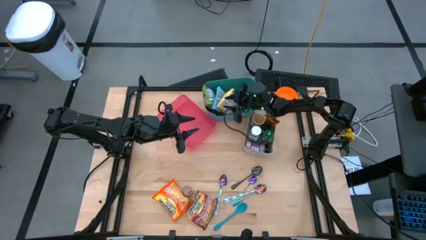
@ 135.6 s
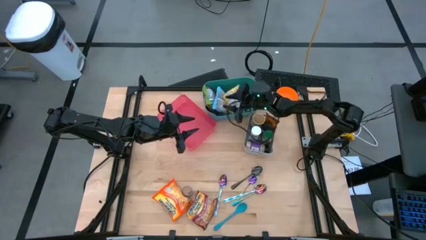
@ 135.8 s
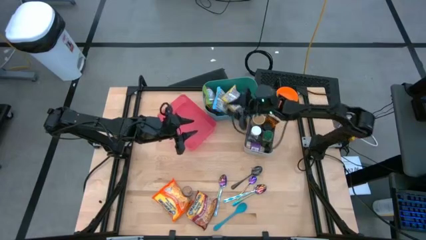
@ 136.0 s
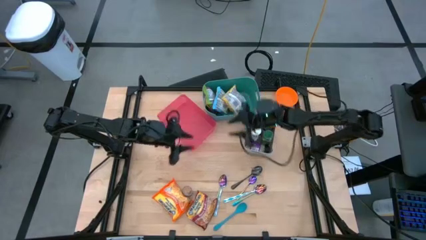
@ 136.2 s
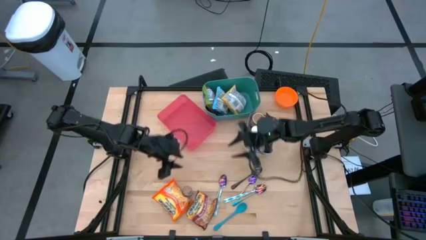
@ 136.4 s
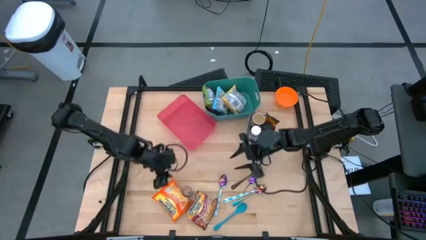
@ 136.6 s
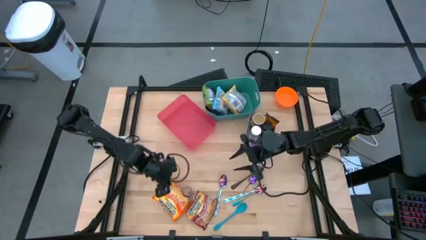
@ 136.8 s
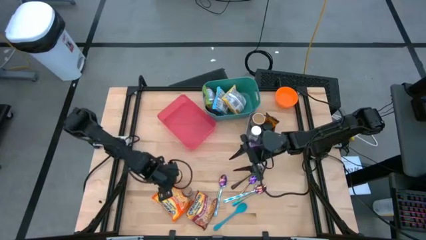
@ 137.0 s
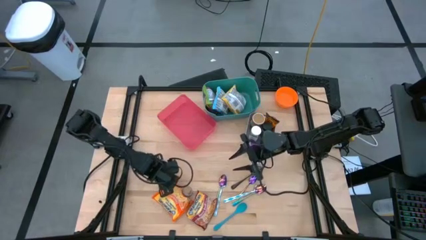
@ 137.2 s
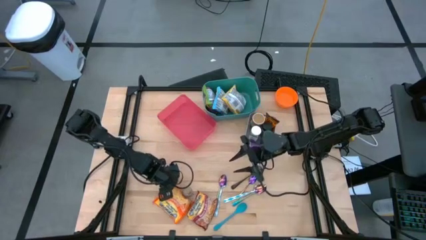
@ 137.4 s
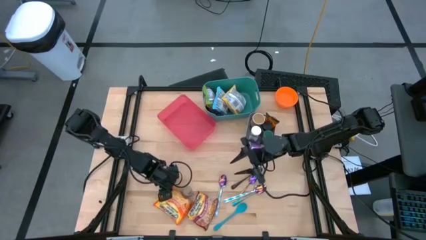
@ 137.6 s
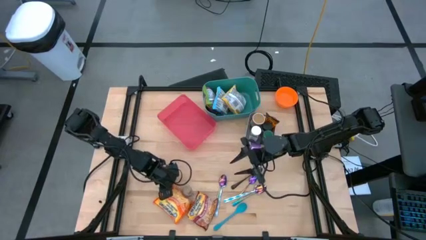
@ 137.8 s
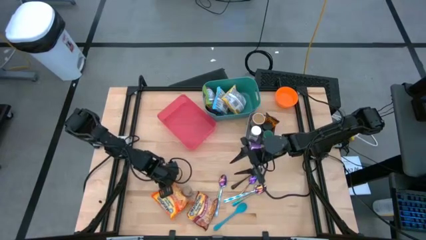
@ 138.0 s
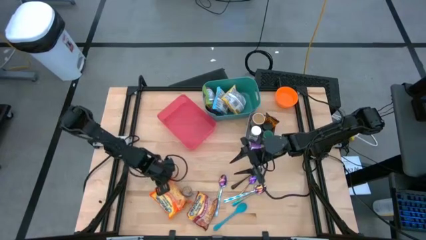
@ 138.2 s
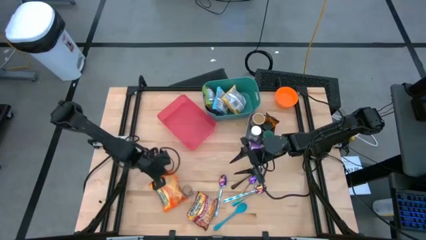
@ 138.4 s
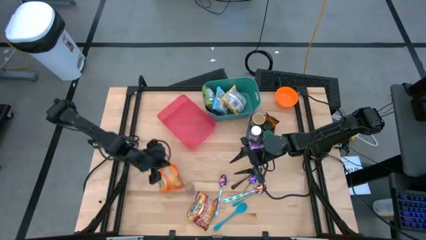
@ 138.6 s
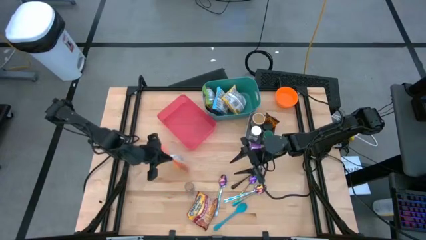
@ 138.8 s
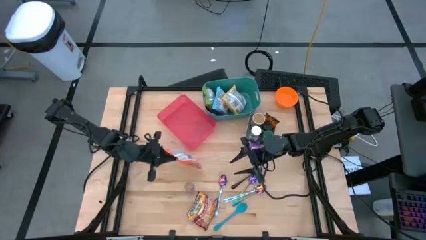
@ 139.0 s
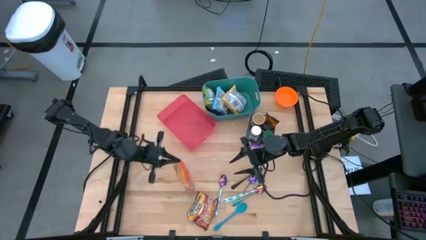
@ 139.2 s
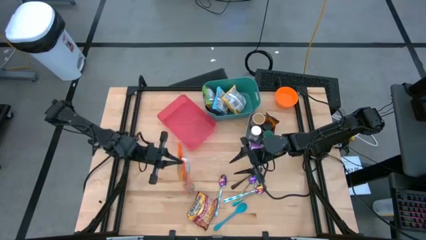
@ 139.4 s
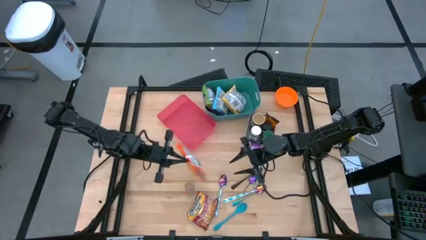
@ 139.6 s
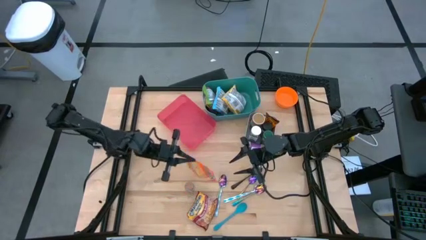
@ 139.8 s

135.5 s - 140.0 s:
Task: Pick & Place Food Item
Put the orange noodle pack into the green bin

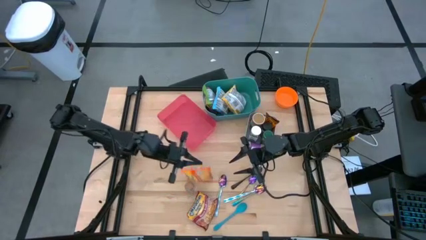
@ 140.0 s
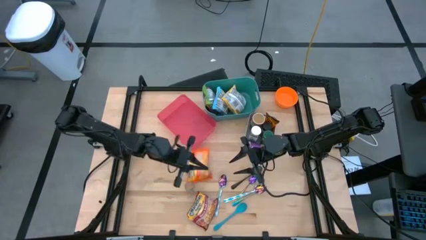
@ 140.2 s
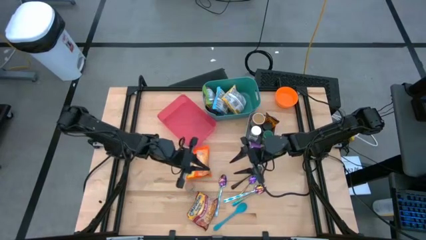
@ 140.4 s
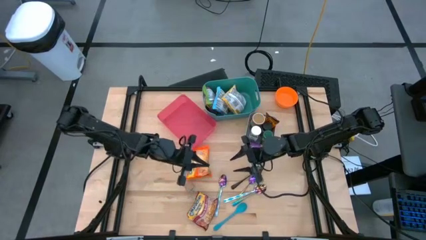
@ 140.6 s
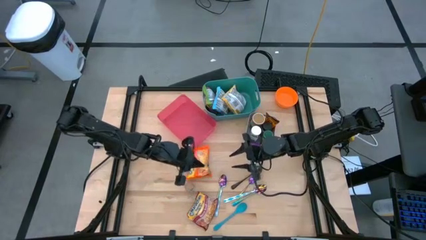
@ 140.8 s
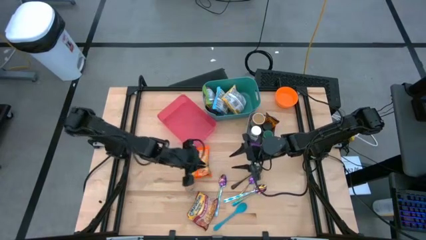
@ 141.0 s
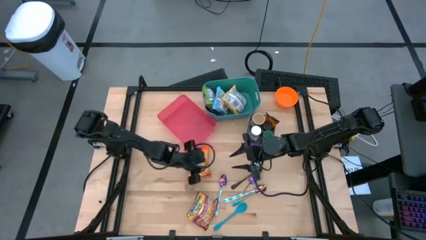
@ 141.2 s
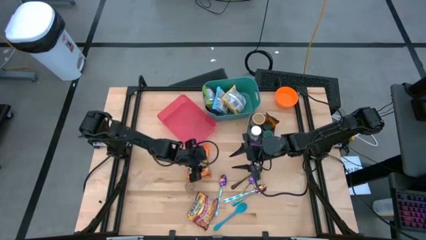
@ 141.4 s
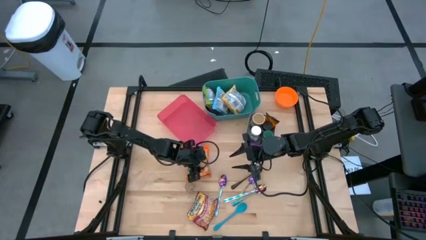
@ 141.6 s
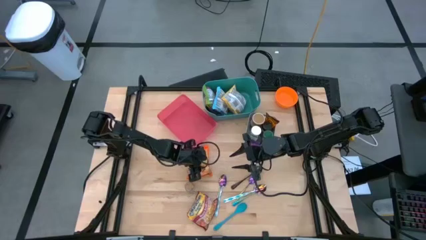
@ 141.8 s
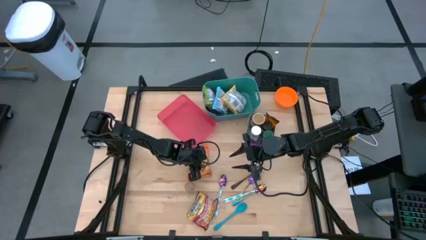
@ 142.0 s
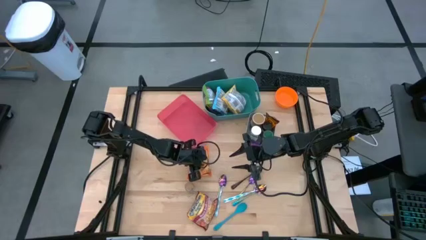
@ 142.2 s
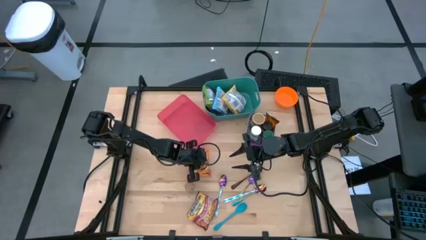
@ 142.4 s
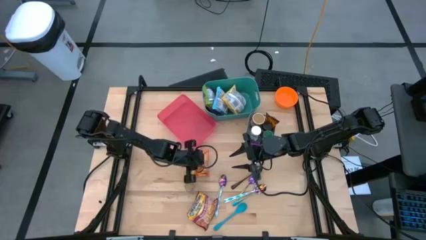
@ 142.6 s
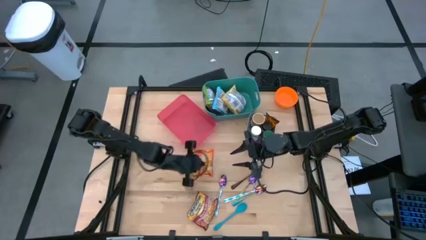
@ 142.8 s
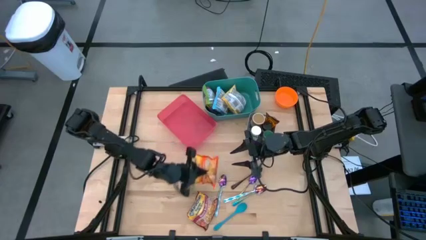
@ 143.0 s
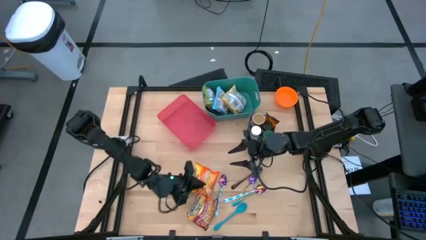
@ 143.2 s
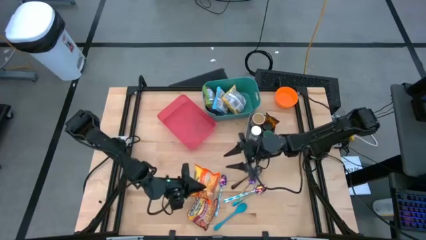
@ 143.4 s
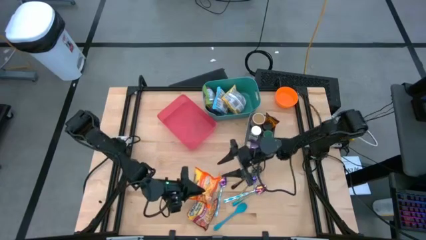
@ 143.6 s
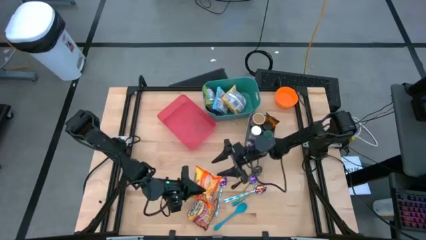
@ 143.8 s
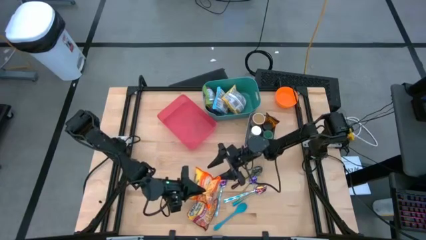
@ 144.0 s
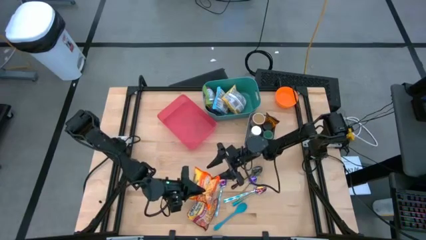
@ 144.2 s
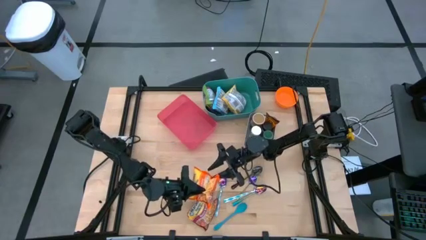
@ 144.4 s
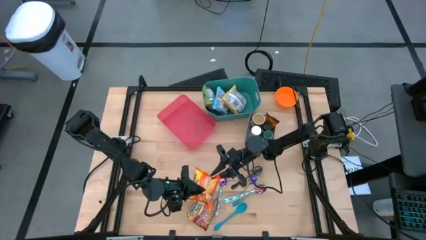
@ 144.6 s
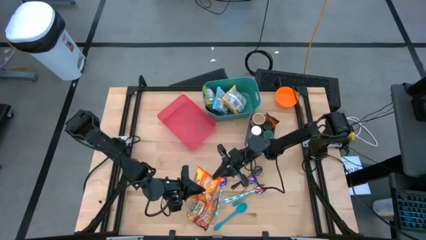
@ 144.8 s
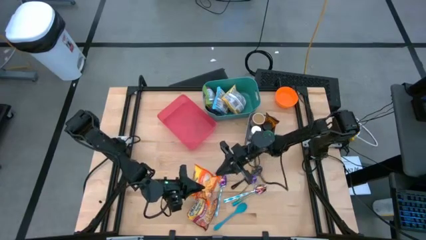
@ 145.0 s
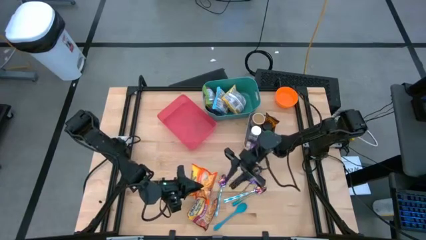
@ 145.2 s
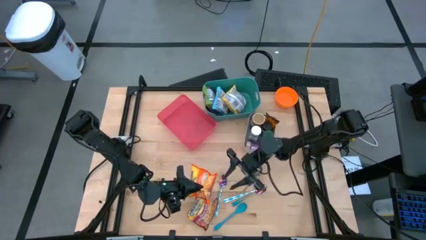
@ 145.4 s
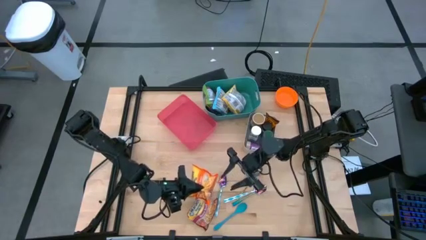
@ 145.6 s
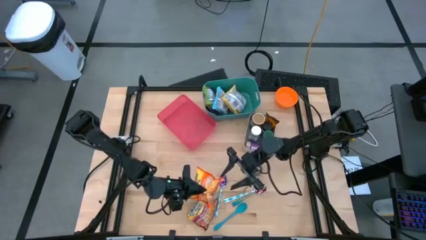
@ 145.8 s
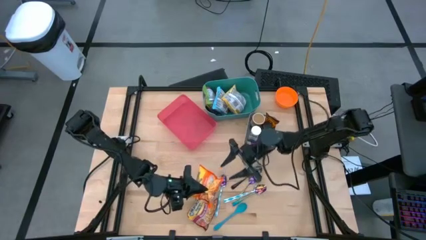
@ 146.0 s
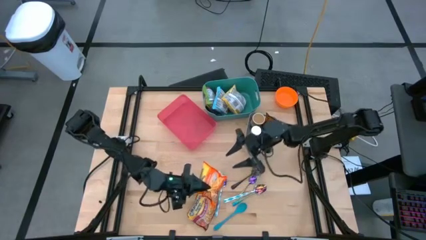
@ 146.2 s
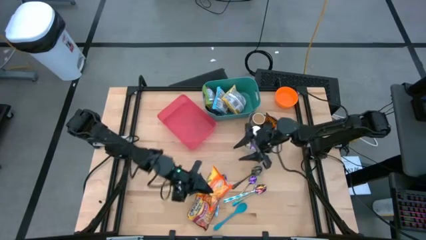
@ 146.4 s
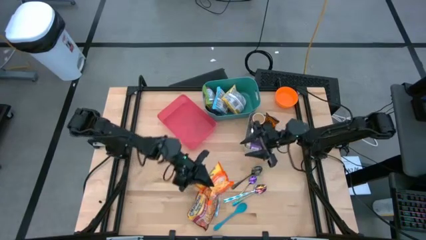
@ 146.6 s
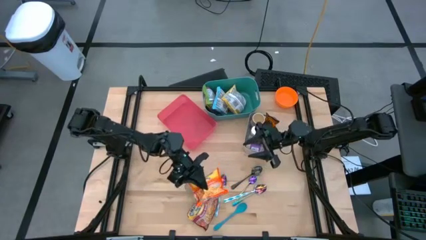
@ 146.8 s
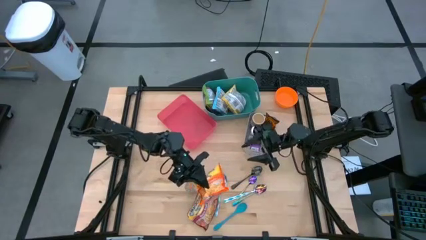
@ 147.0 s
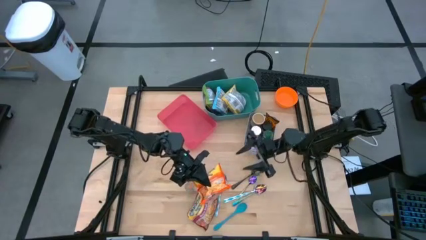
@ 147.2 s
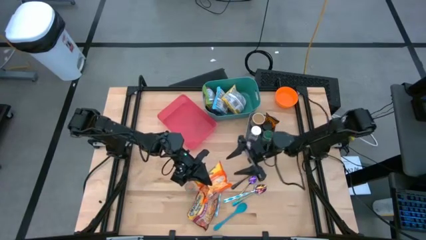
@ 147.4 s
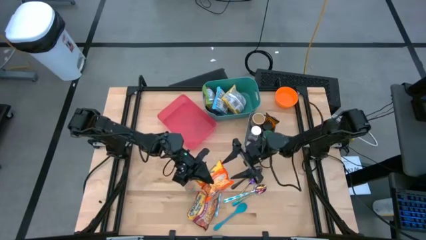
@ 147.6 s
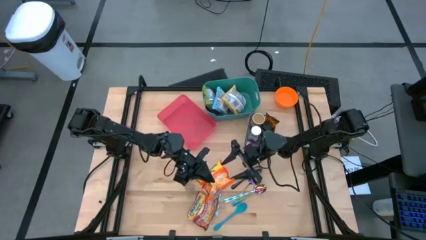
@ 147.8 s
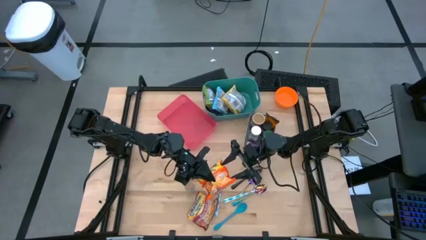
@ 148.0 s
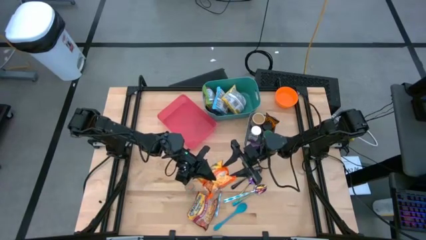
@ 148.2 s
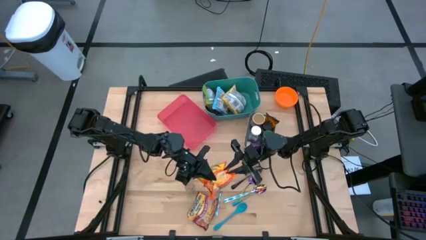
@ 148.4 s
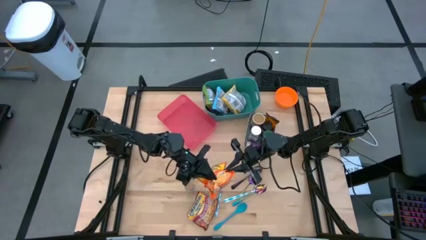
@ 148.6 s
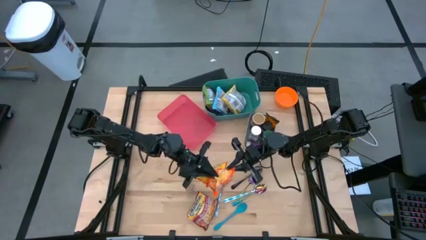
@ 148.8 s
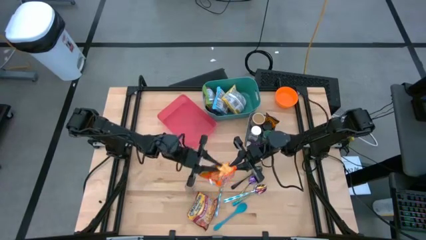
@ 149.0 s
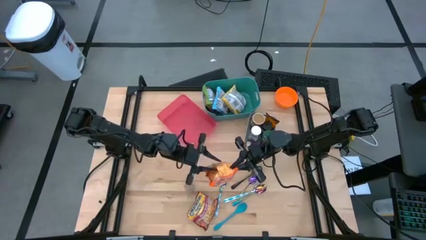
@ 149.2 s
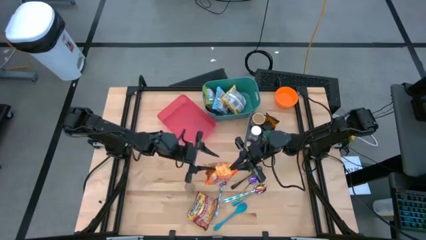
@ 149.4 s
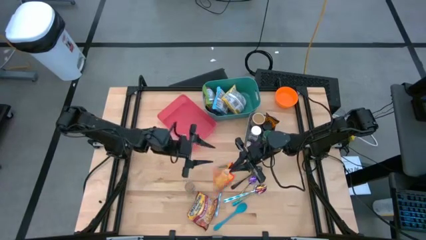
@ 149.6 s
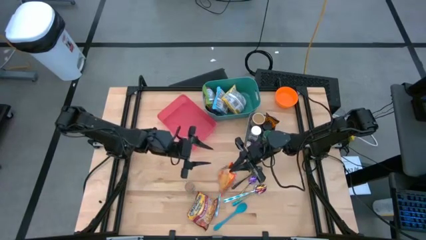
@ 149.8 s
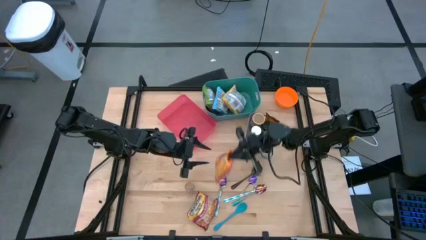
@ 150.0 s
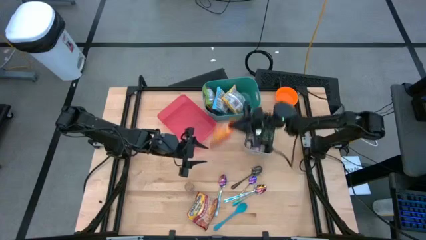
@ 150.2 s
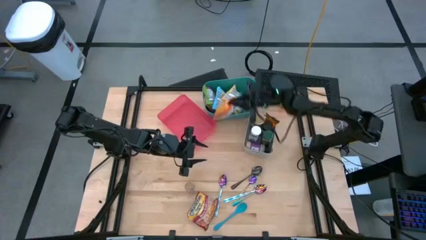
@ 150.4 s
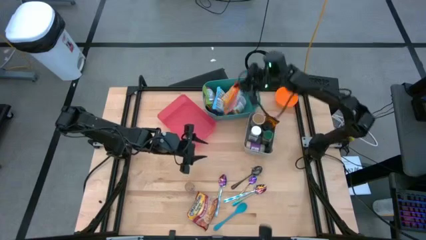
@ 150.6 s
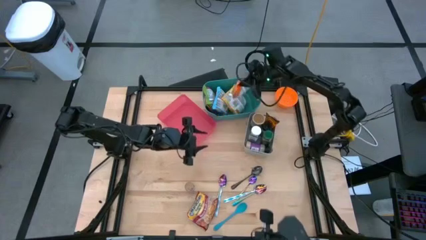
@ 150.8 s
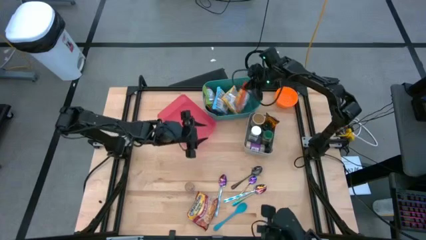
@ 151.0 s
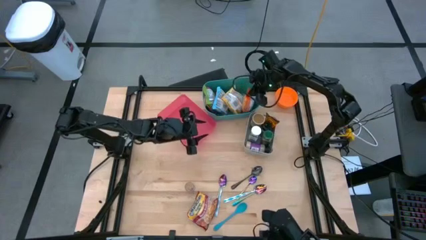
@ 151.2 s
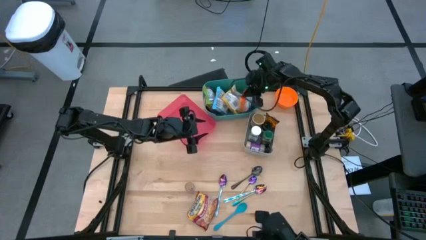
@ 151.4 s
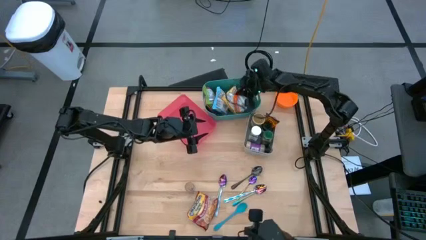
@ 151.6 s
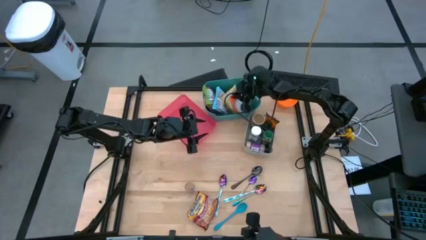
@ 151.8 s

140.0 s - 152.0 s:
Put the orange noodle pack into the green bin
